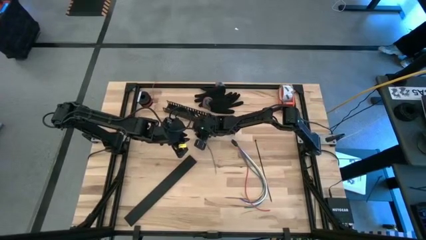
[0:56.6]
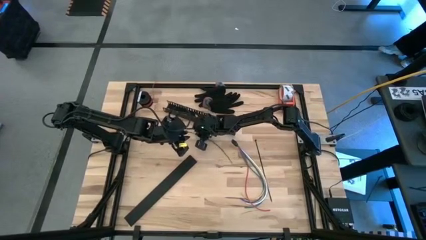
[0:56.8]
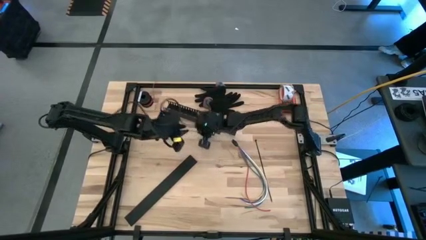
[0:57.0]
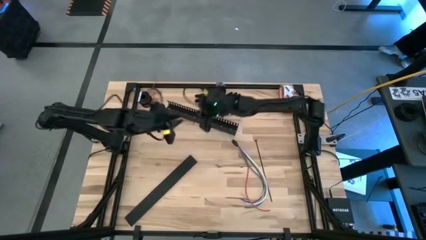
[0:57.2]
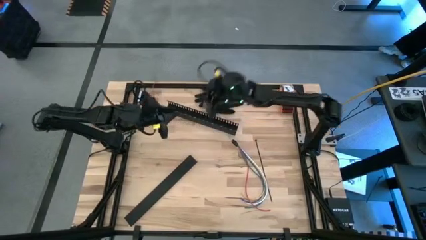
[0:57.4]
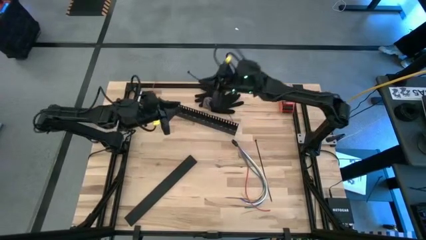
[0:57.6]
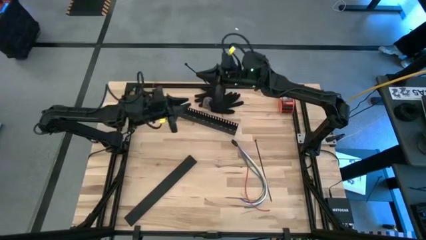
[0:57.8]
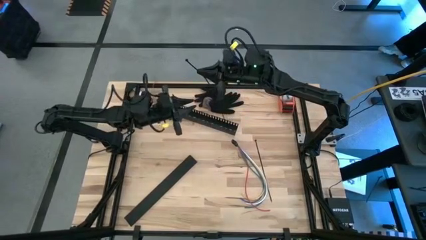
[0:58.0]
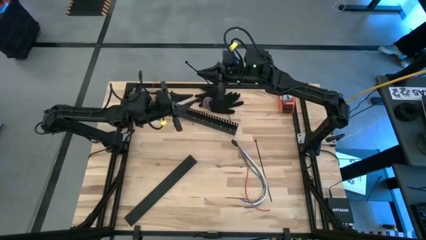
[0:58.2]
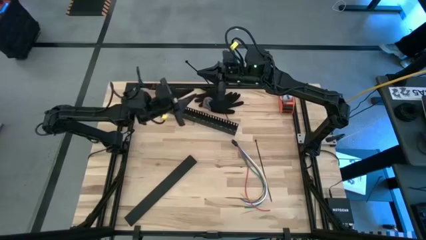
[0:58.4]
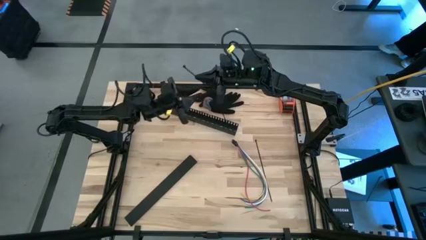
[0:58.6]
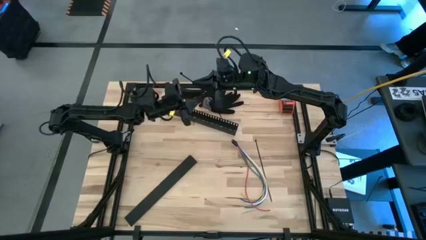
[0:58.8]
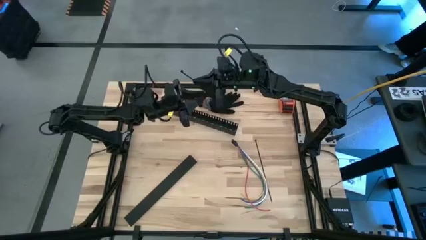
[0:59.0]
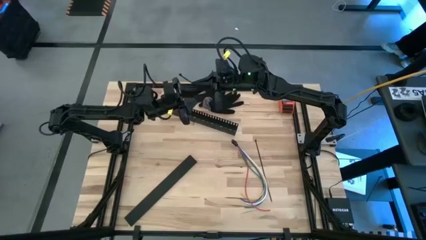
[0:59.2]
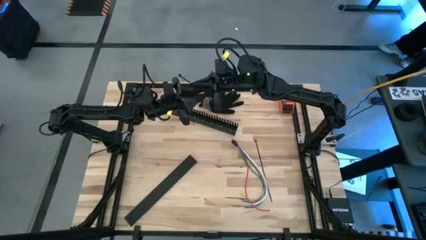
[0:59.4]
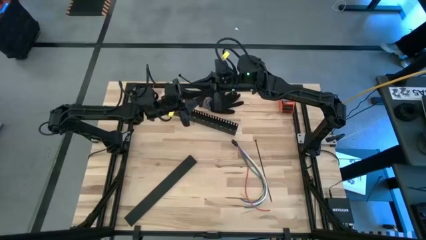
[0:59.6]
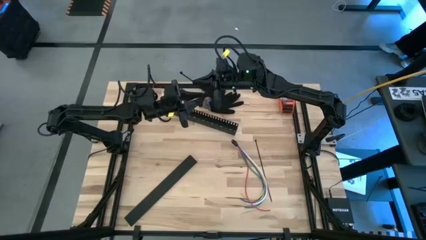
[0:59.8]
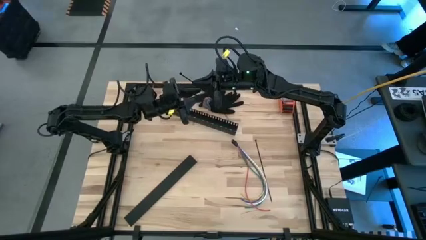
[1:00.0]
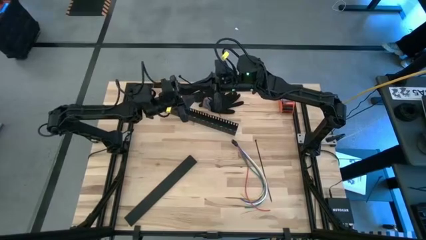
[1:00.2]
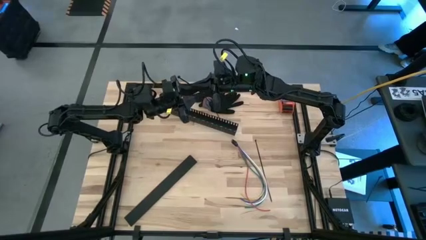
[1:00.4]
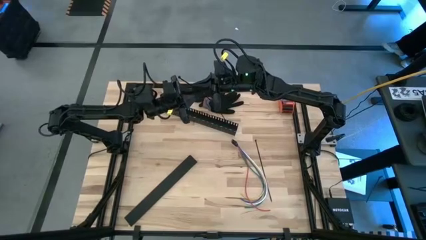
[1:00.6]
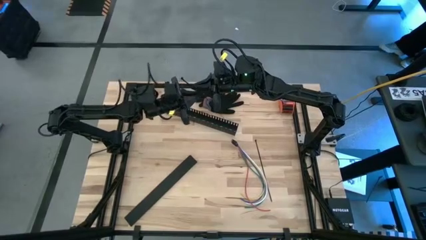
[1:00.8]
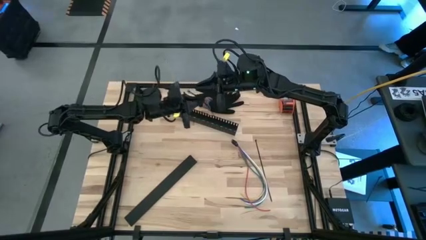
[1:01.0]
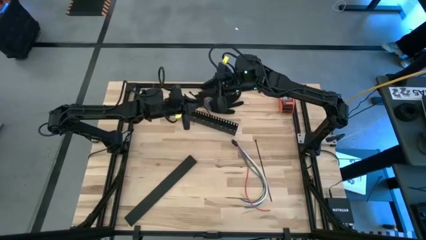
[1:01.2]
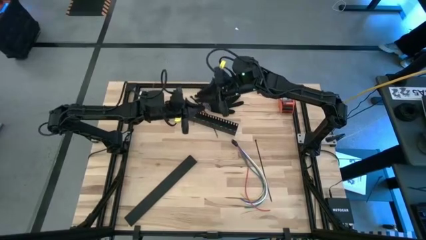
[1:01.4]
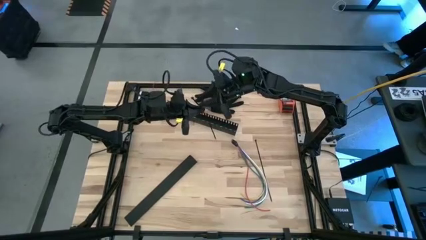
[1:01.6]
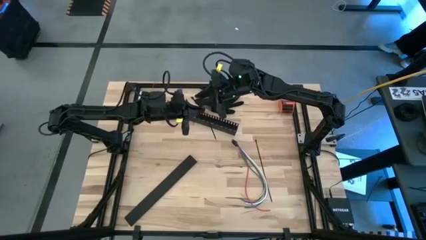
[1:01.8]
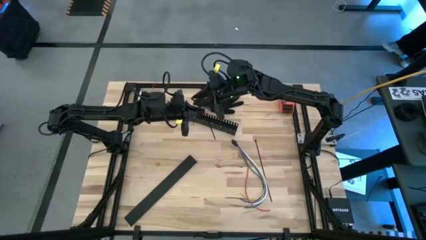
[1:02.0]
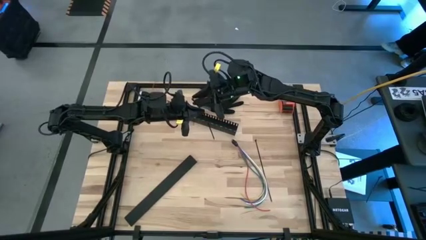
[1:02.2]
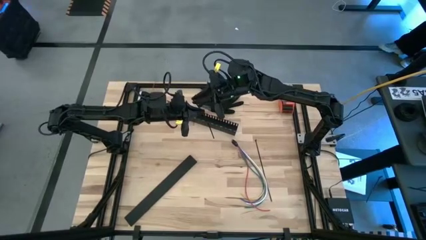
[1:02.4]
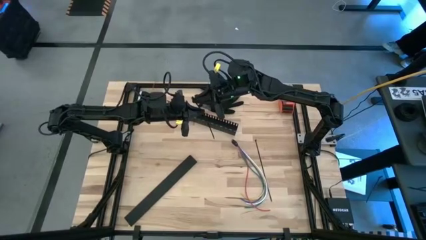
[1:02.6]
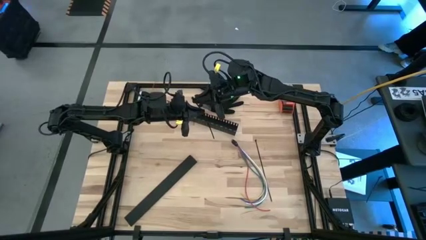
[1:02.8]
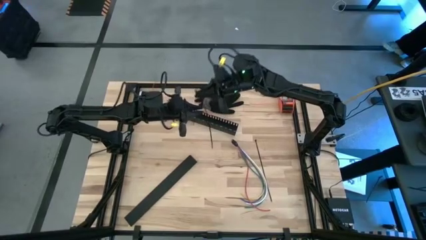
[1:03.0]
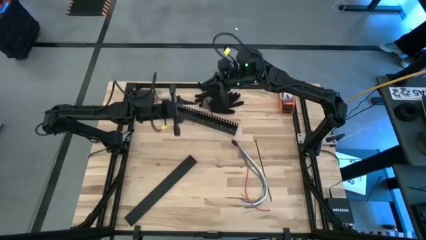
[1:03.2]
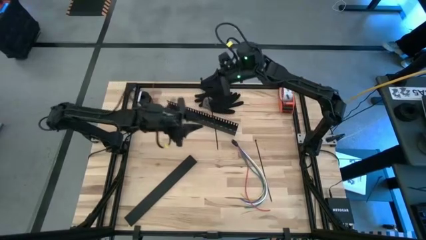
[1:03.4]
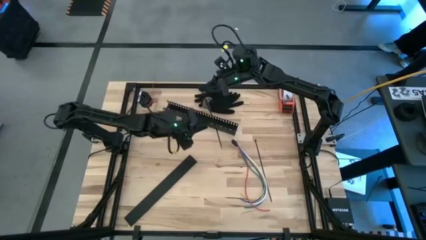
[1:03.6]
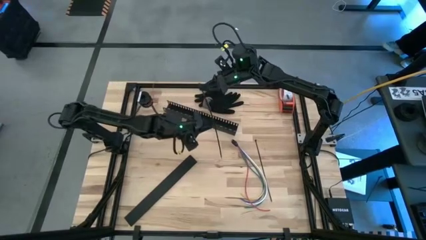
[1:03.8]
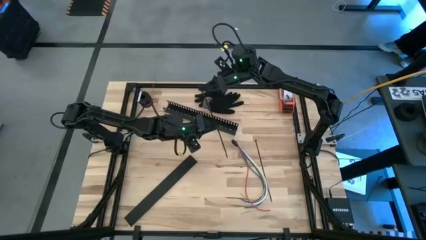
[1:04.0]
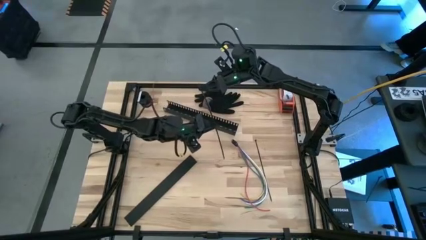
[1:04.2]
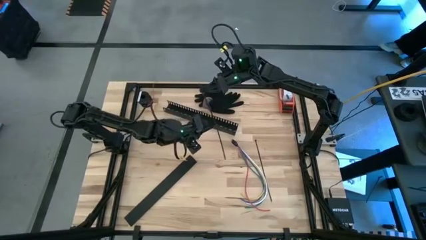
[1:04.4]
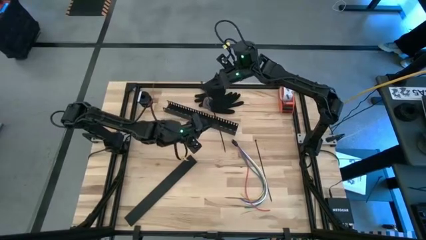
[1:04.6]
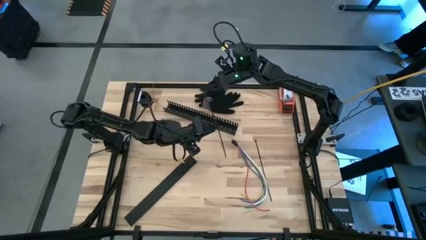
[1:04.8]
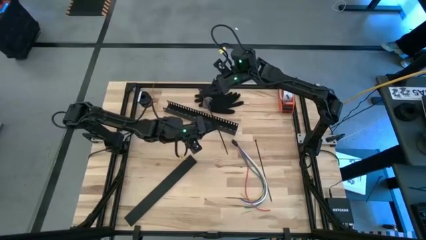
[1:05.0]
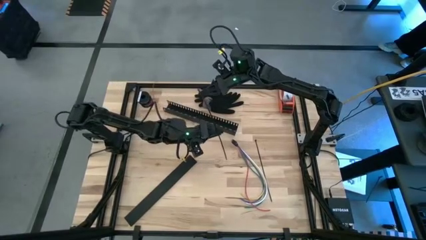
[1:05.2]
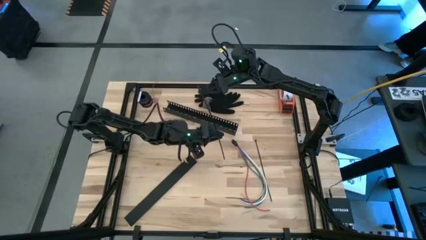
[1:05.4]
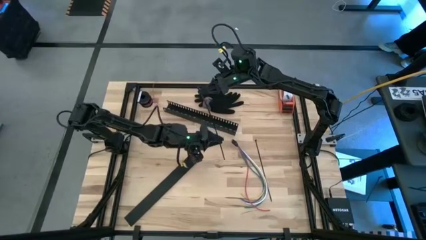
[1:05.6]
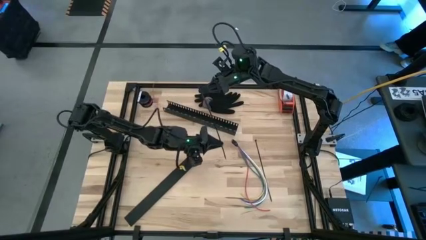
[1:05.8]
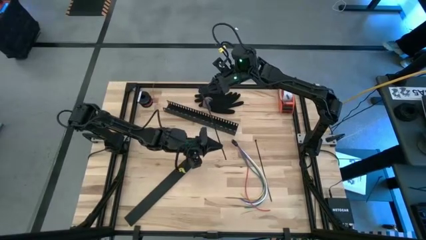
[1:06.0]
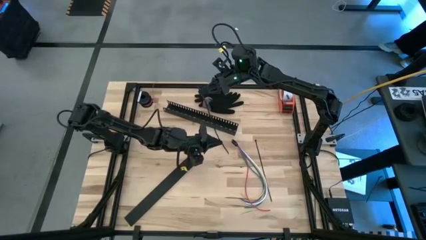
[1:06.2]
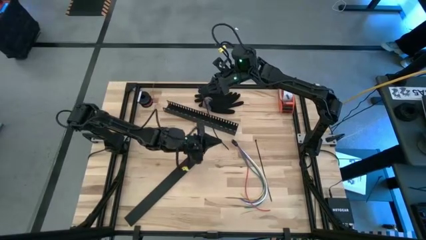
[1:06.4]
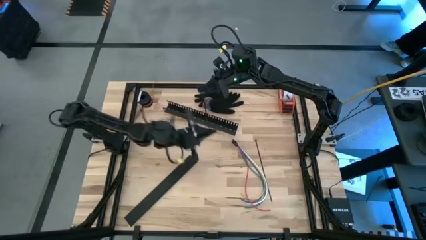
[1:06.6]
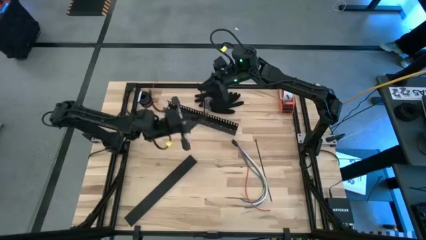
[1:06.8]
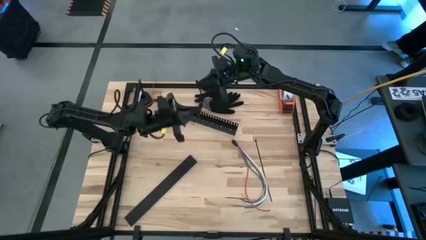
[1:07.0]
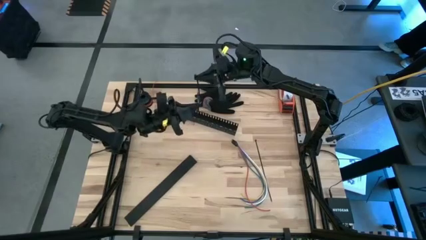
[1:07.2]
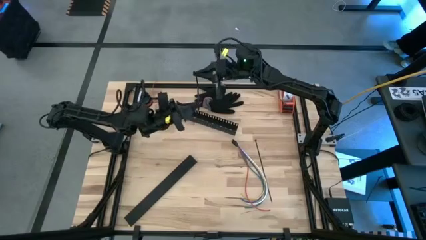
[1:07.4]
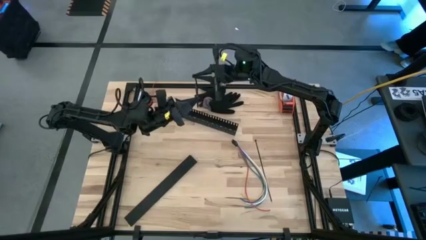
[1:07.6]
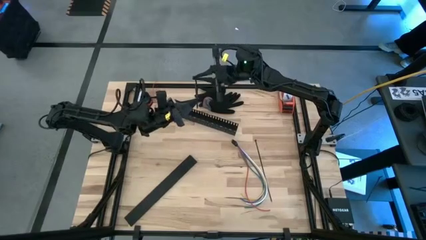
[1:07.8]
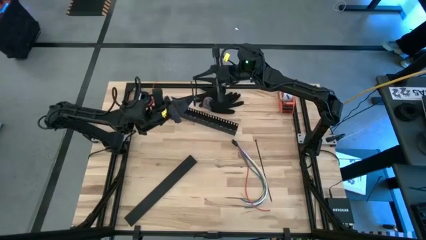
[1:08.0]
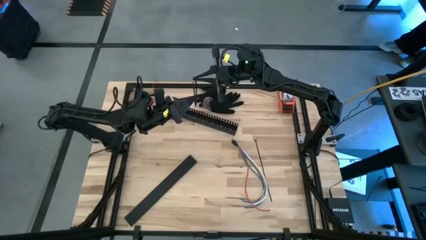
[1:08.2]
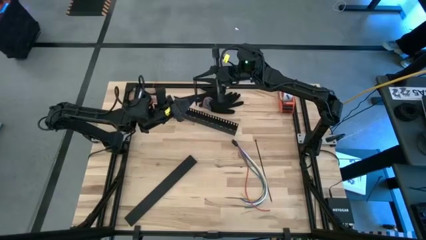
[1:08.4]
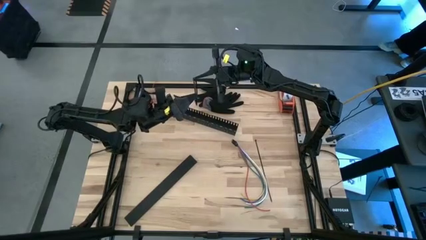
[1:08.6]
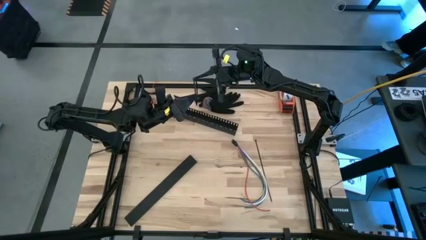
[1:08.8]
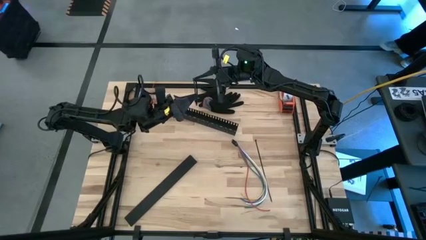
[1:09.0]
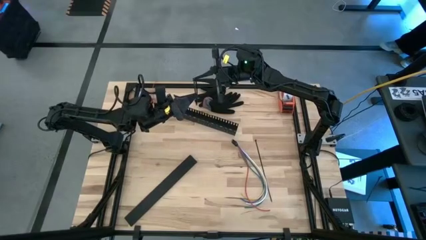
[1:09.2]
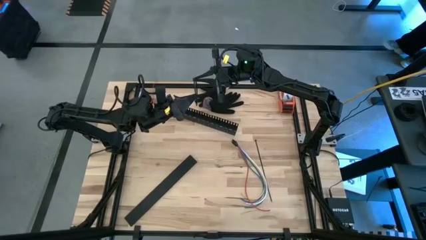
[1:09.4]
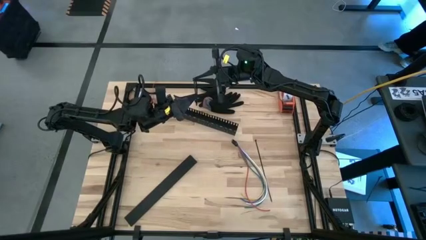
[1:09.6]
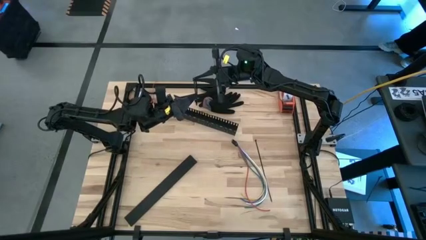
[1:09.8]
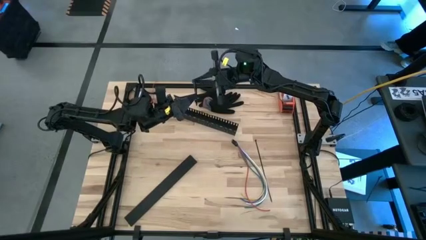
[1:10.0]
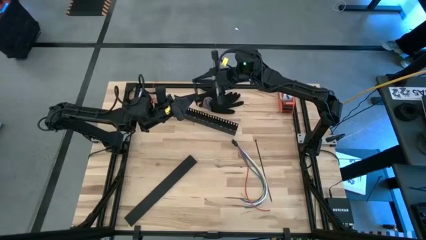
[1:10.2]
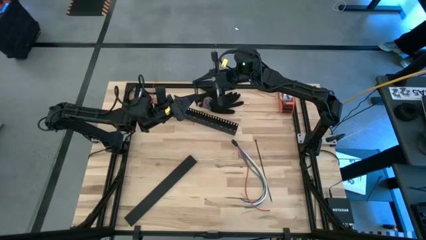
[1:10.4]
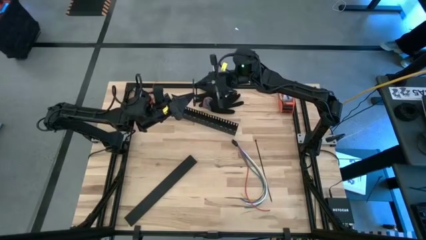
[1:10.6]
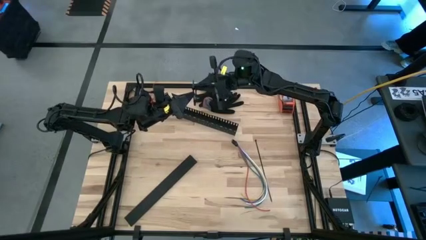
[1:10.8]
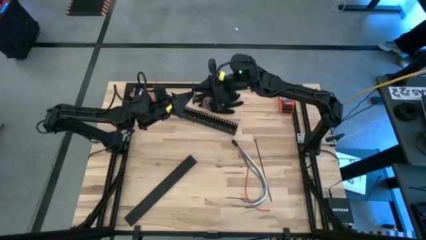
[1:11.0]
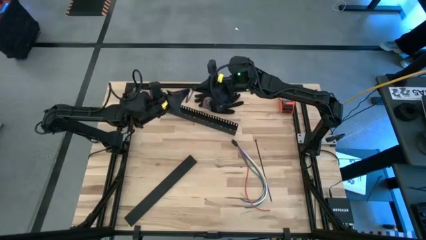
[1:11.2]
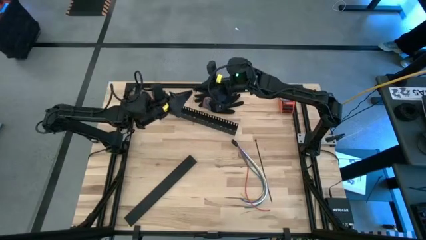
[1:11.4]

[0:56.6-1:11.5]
Task: Ziptie cables
Prepare the black zip tie
